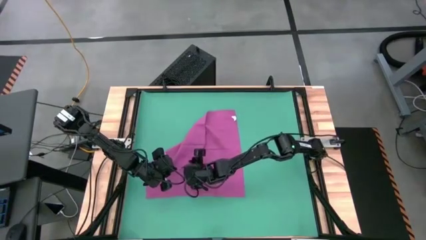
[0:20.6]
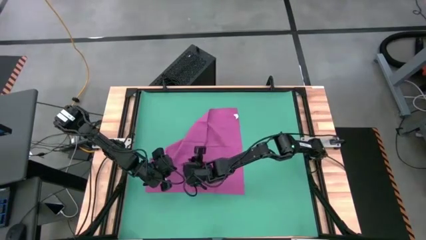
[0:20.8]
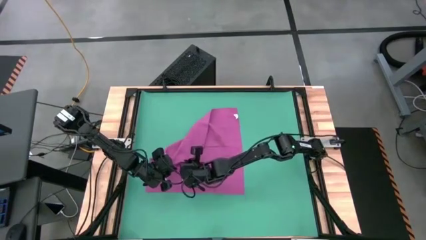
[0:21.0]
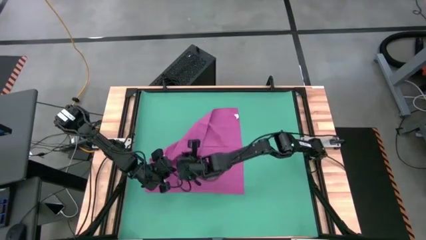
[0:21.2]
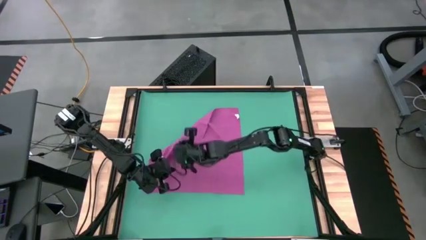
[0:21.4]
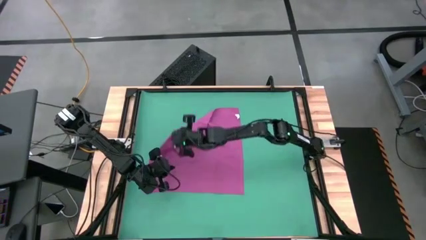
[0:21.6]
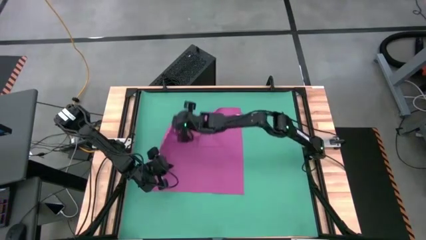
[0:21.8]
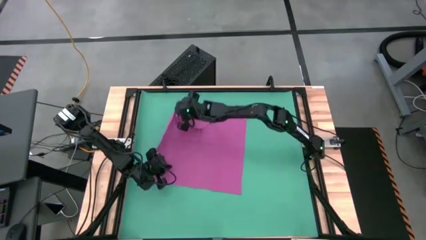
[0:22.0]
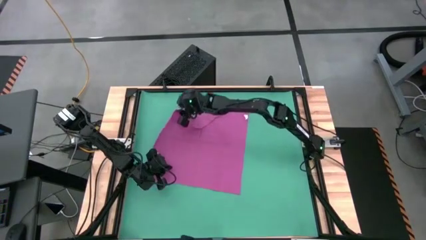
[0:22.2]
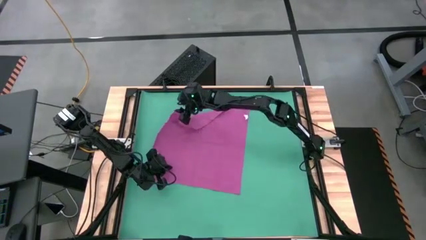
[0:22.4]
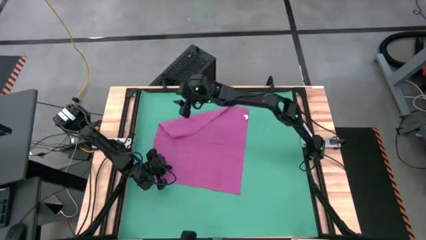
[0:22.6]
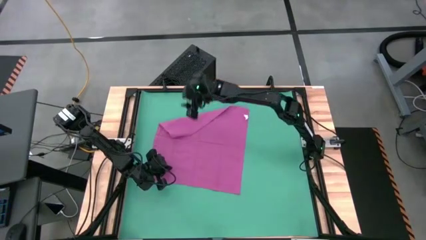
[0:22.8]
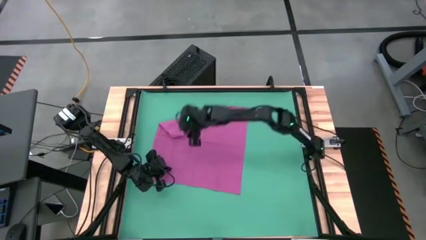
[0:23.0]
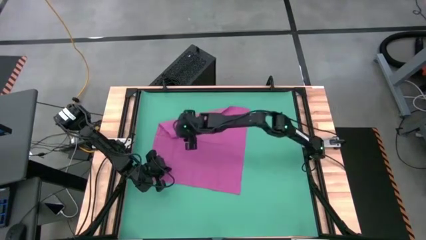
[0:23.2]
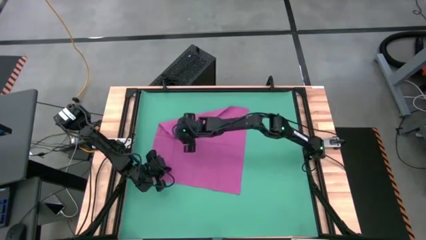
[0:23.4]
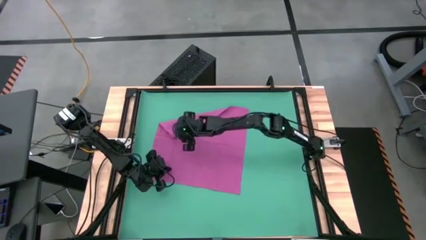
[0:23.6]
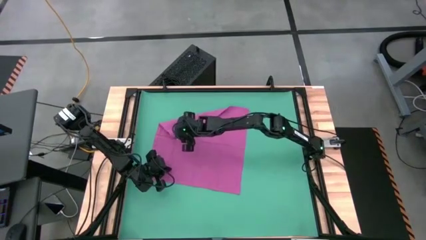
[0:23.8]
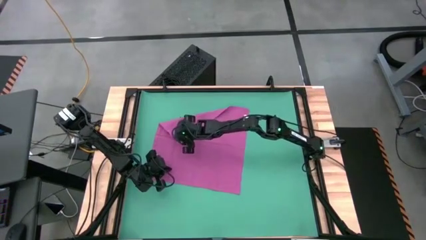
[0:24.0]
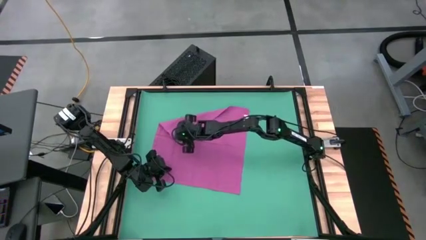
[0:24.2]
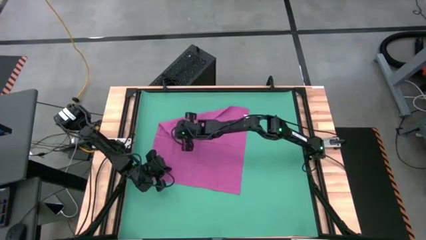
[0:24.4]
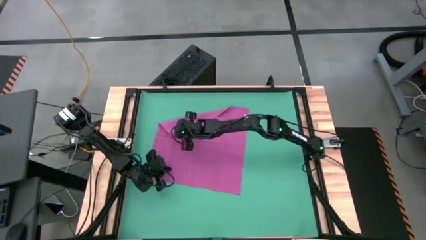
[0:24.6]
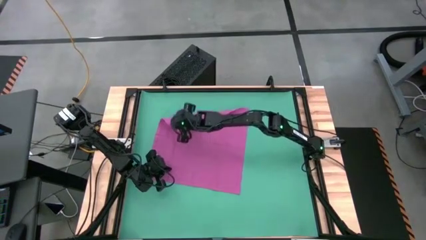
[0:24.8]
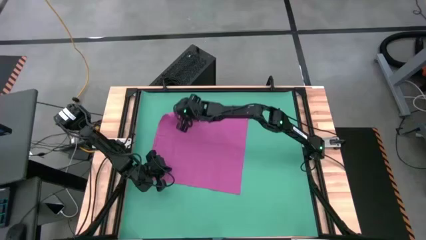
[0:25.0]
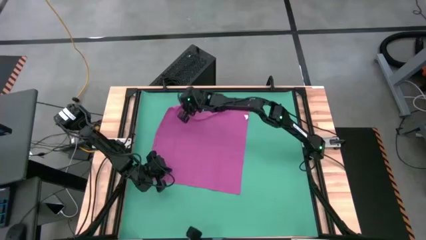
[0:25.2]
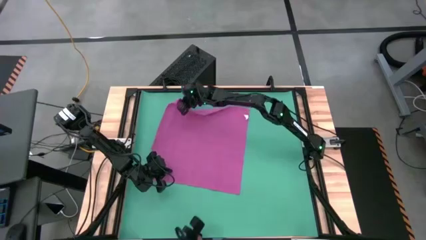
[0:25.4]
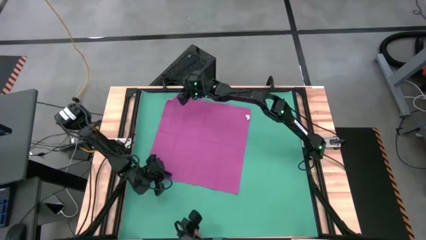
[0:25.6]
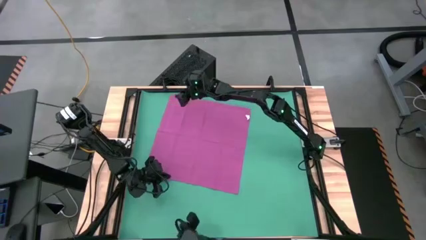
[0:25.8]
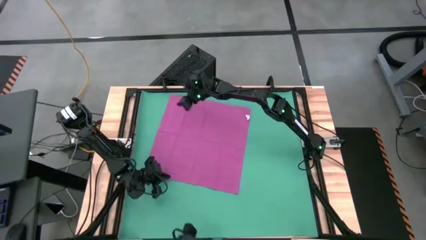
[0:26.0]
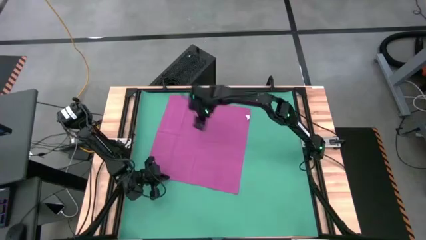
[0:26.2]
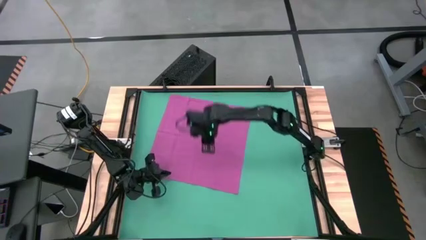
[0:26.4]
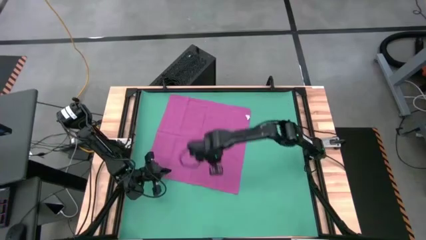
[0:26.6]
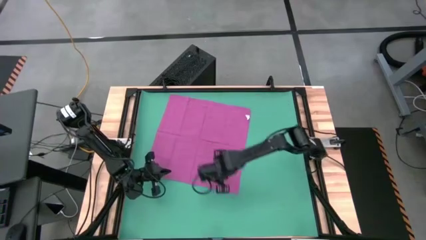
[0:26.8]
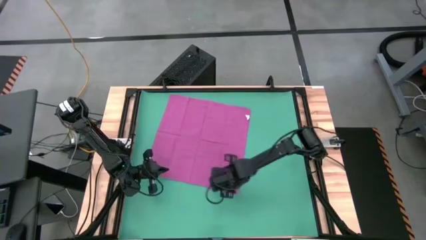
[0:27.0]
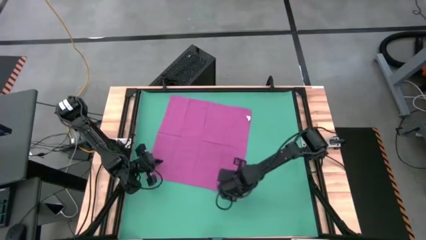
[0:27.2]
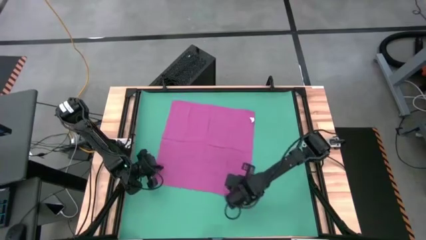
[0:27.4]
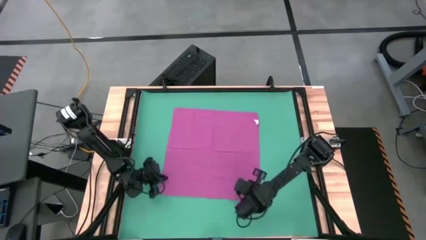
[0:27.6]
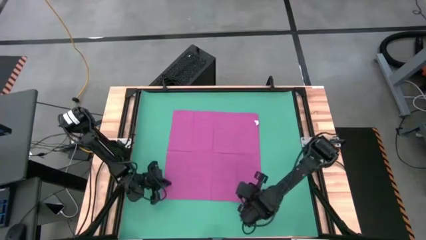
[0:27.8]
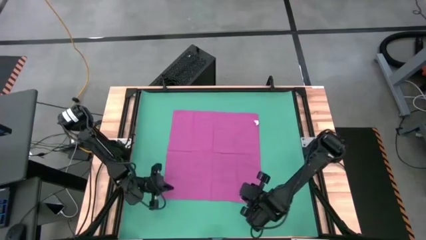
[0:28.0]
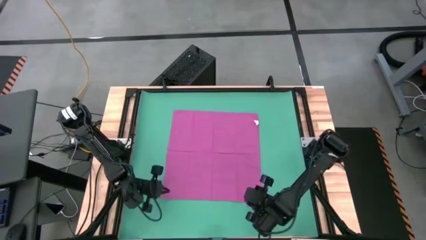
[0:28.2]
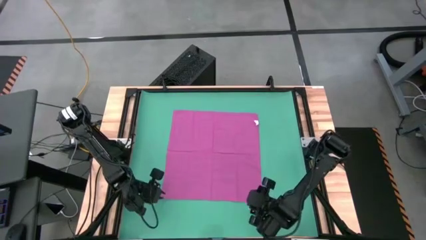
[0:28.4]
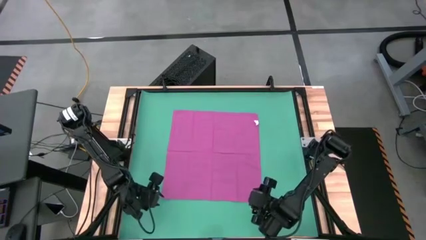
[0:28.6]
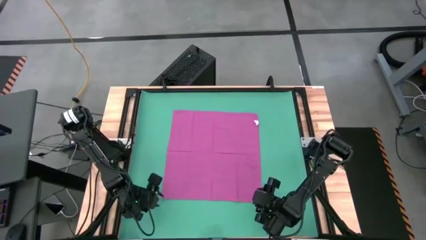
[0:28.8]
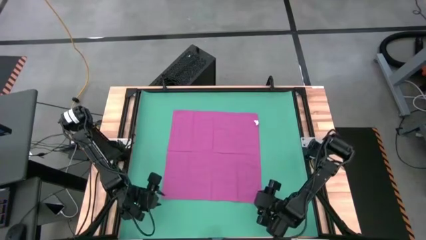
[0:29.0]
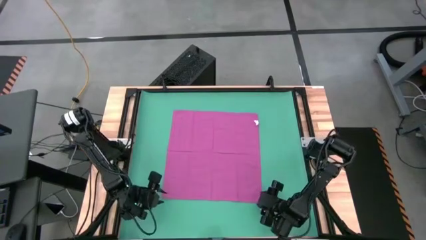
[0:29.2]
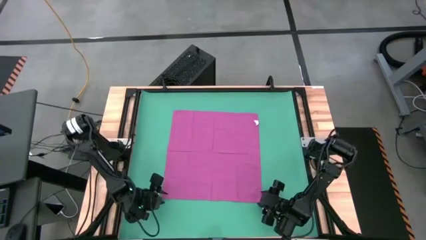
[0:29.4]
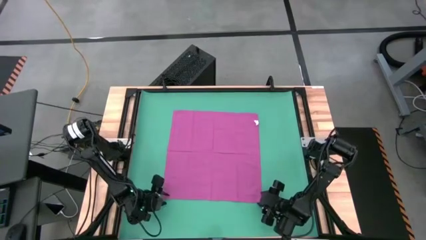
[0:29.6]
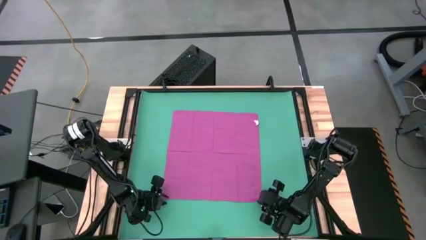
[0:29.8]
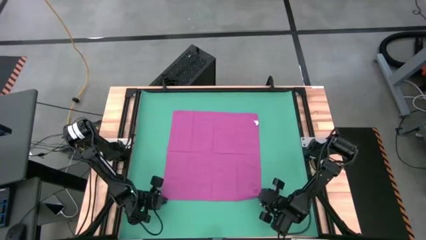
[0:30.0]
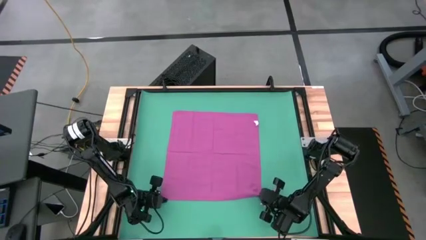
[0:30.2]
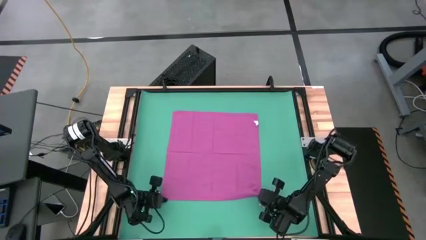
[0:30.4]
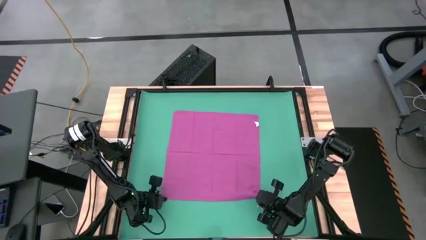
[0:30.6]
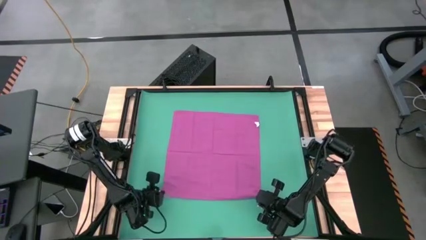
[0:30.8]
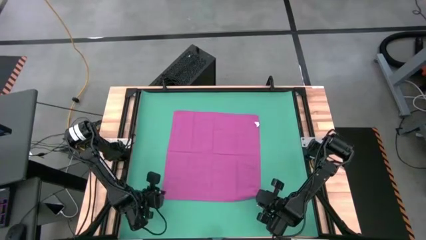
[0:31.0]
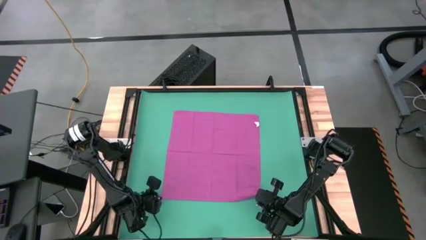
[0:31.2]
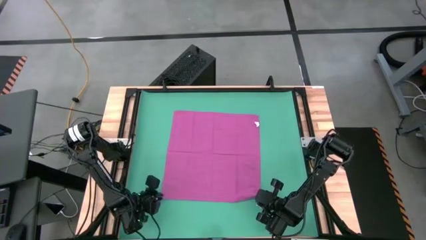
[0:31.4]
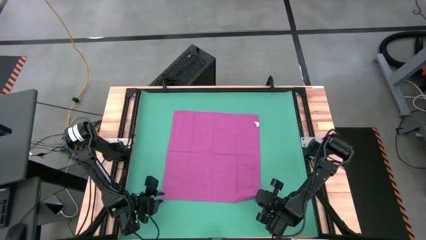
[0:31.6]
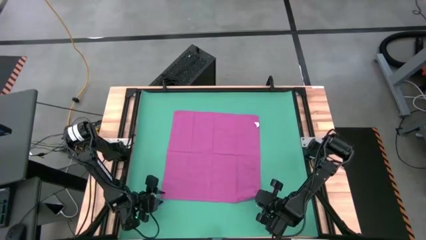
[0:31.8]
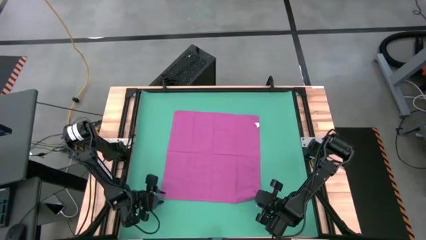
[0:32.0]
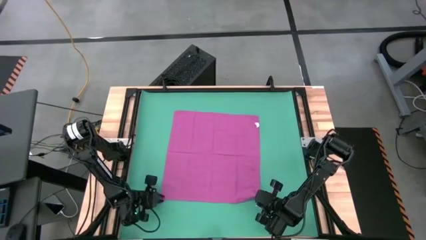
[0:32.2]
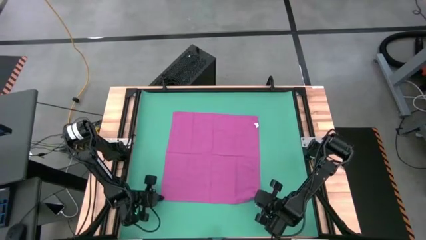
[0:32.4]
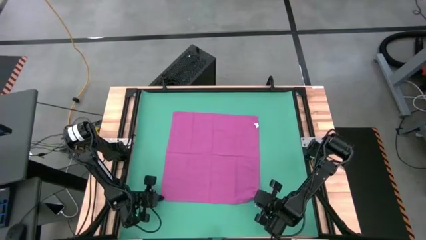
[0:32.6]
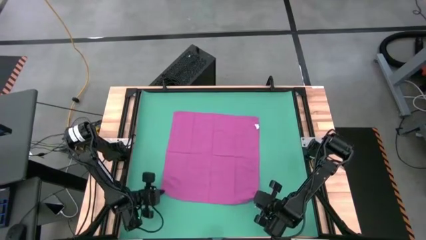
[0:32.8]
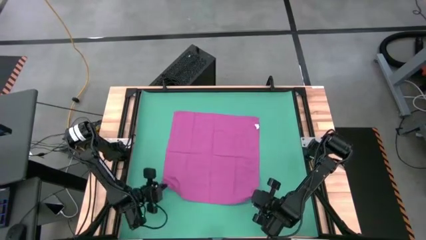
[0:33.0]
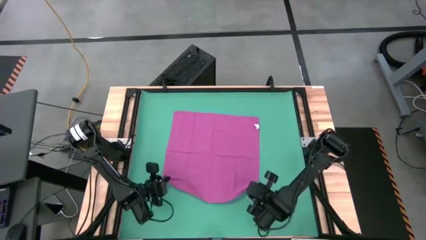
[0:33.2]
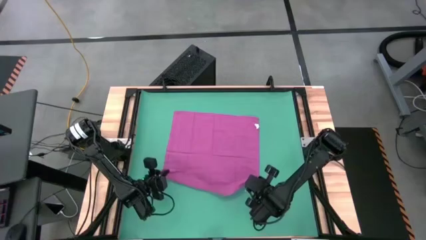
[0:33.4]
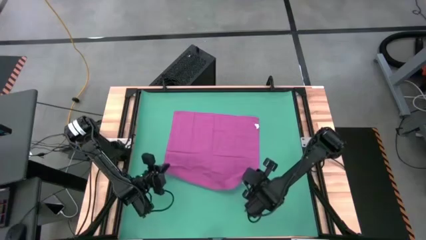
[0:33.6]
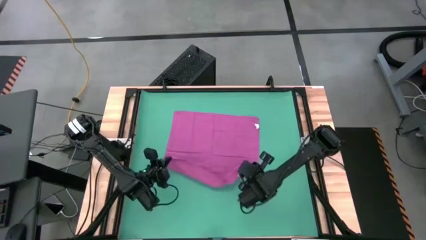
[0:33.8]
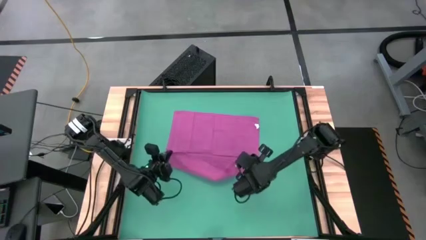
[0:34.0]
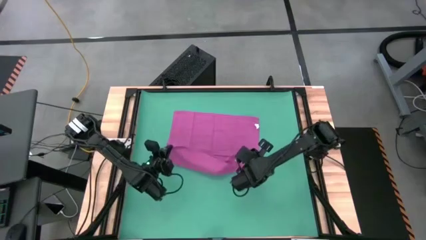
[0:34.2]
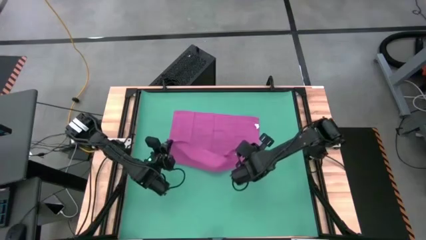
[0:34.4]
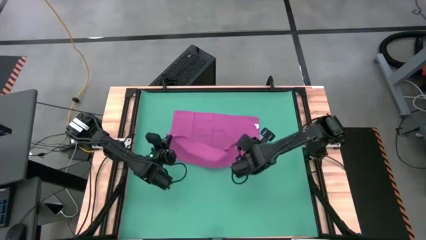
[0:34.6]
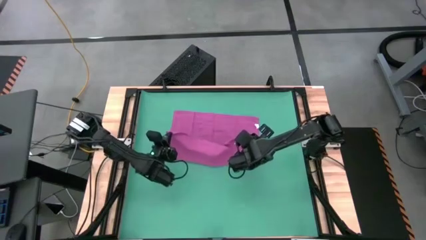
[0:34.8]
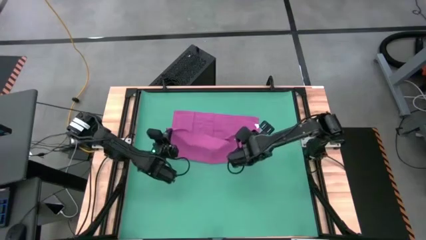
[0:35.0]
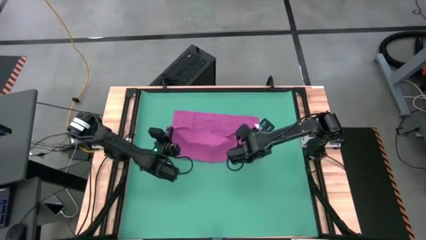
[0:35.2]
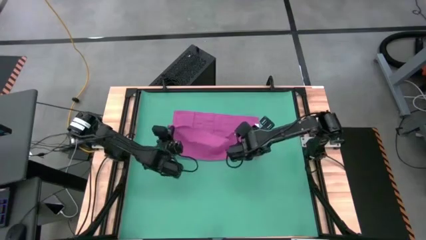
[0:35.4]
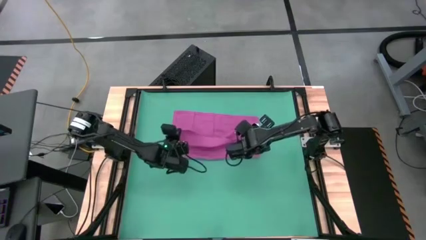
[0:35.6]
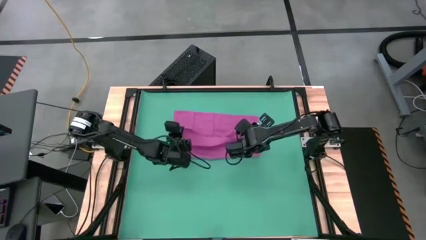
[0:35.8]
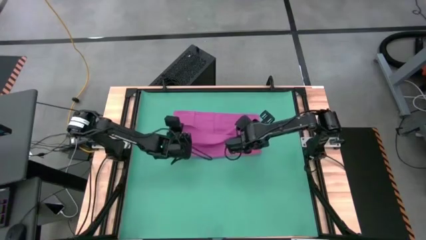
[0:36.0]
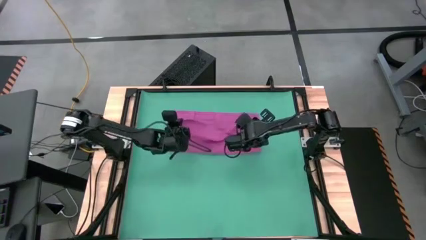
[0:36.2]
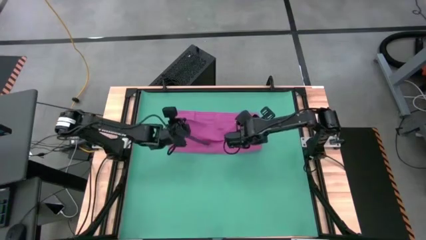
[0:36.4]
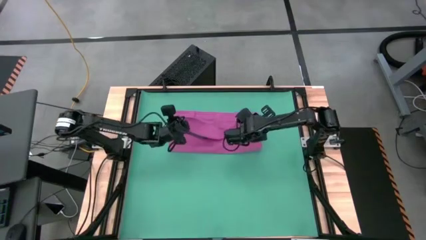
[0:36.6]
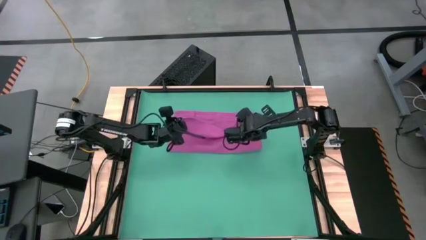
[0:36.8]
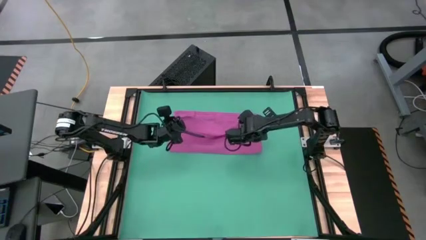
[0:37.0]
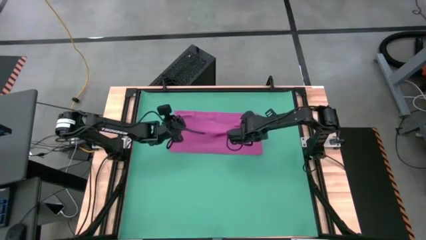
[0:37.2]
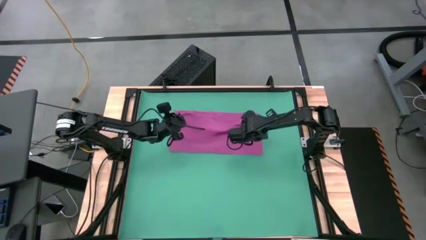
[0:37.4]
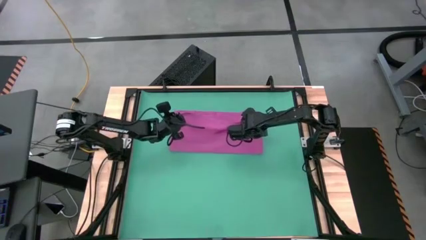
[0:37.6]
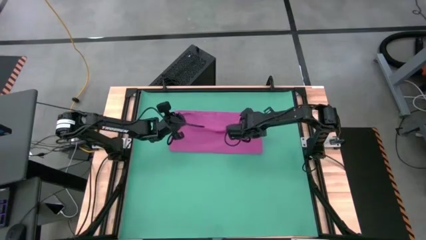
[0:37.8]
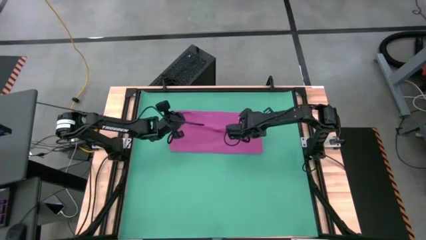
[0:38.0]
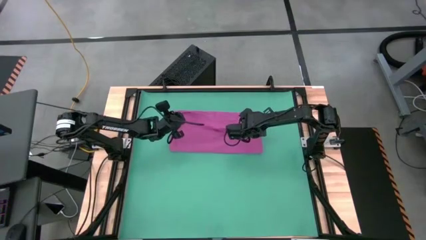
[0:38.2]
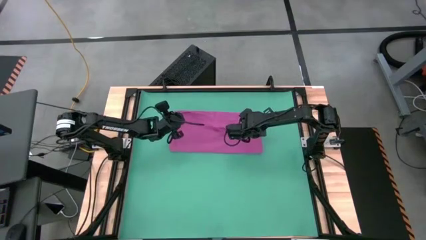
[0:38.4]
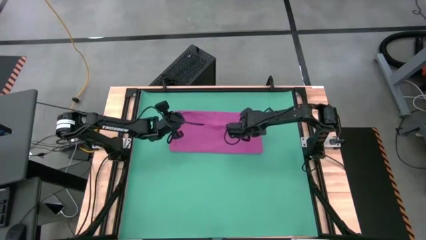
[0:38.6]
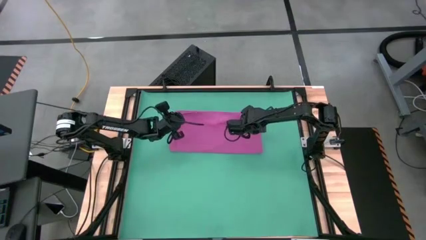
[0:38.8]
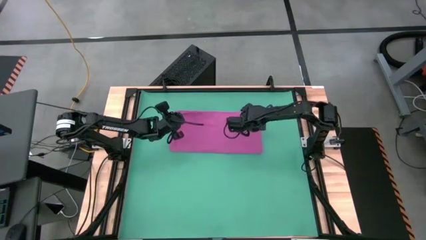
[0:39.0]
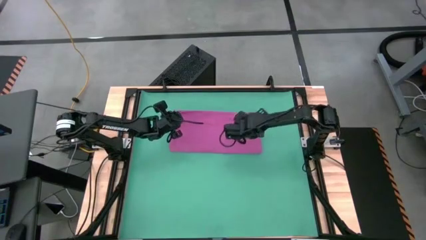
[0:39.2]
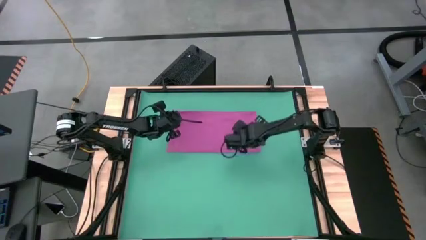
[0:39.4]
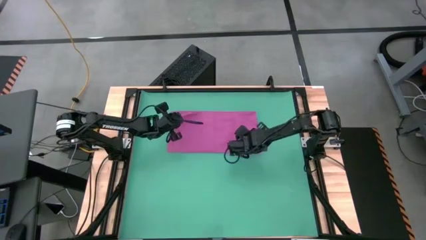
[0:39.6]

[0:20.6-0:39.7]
Task: Roll towel
Fold the pink towel
